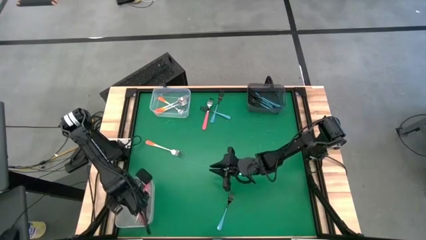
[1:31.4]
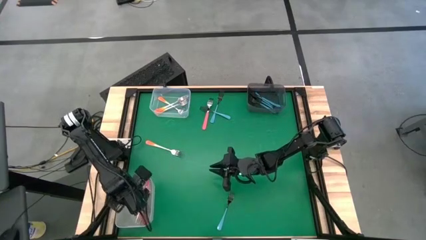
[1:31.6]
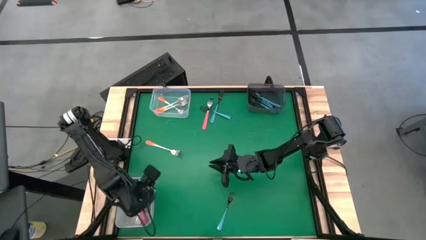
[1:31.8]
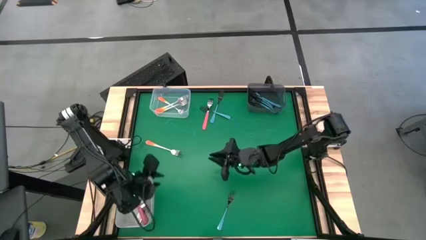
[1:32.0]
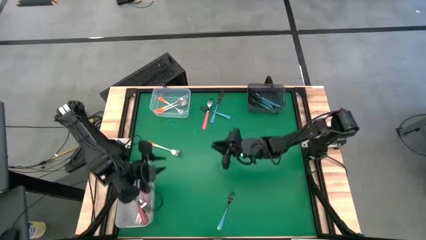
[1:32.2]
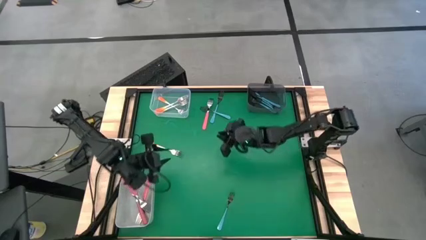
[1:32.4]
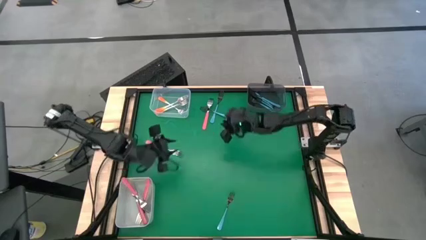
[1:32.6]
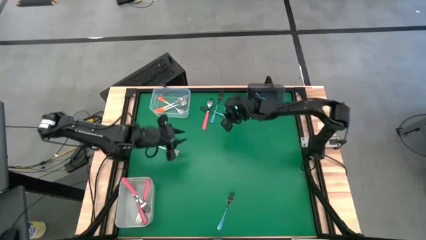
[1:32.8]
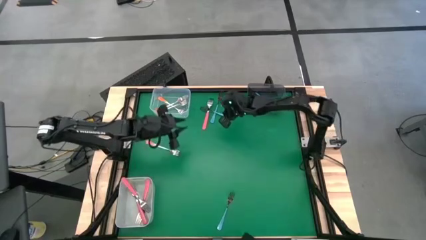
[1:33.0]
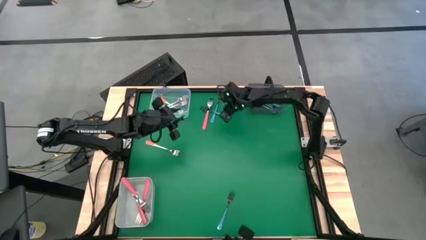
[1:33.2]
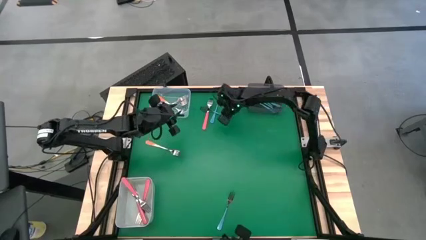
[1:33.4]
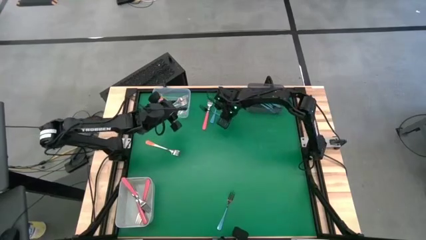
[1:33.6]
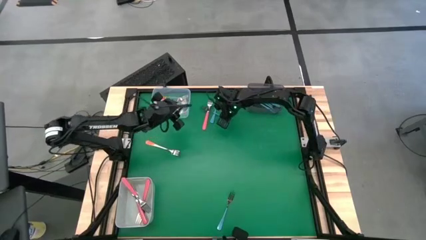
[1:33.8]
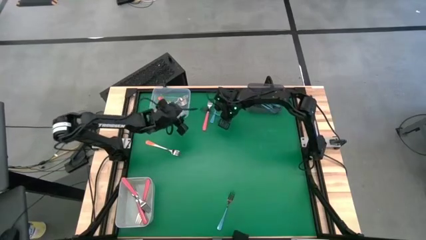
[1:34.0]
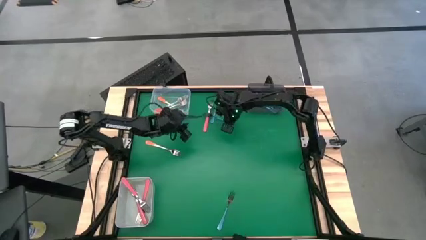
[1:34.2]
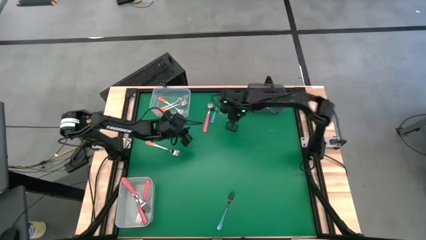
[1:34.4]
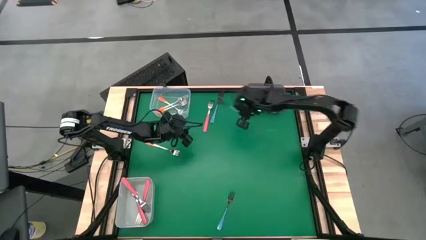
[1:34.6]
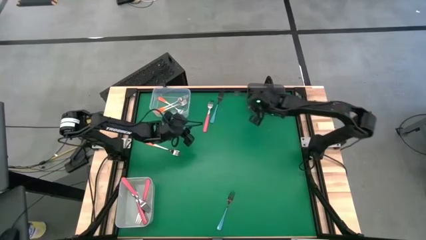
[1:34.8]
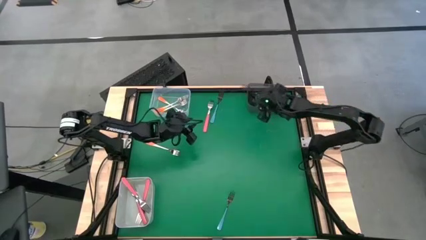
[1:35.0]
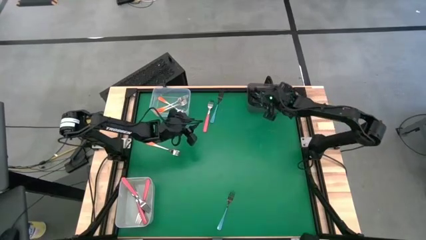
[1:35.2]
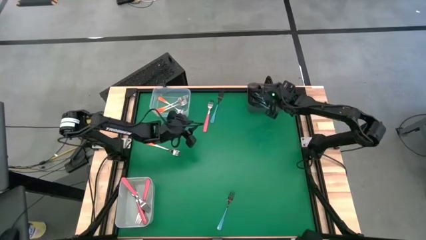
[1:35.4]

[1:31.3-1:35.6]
Task: Sort silverware by color (type)
Put the blue fork into the black bin

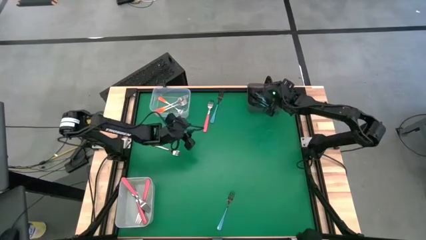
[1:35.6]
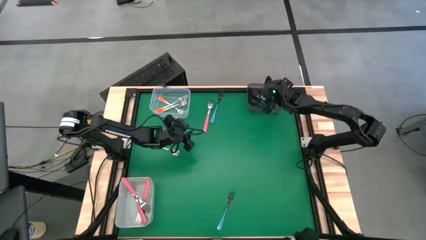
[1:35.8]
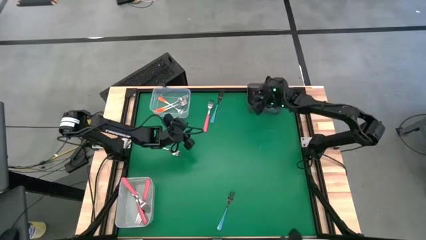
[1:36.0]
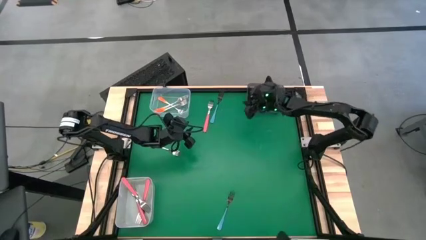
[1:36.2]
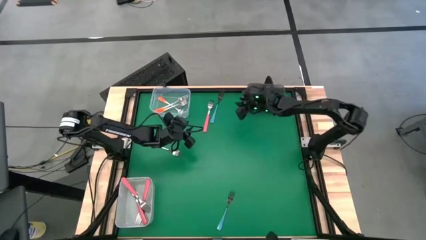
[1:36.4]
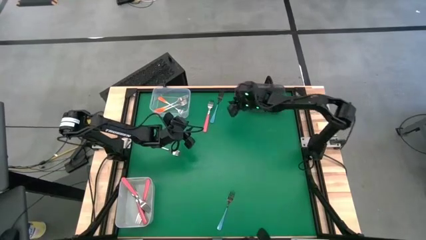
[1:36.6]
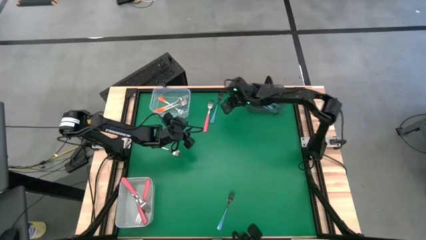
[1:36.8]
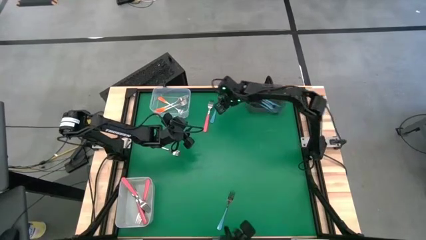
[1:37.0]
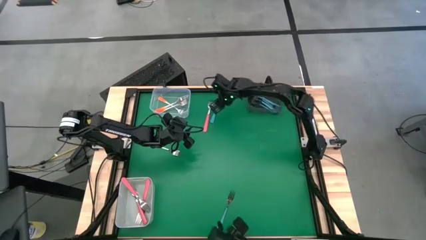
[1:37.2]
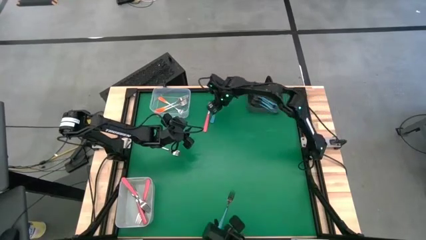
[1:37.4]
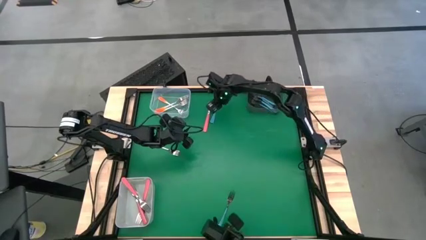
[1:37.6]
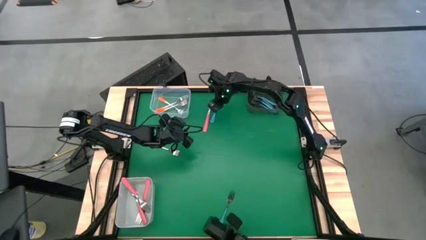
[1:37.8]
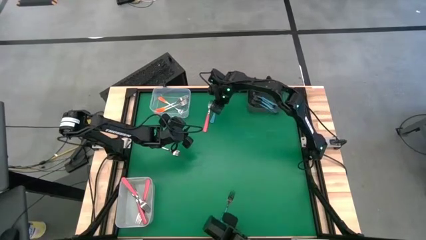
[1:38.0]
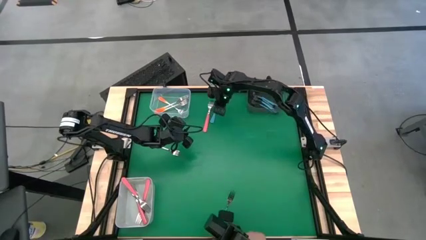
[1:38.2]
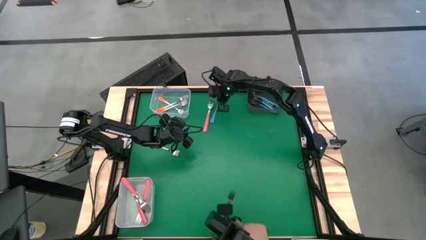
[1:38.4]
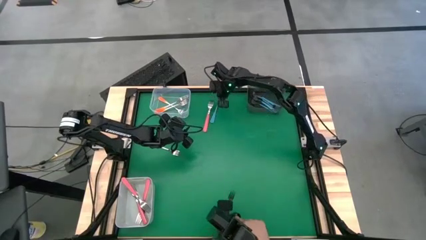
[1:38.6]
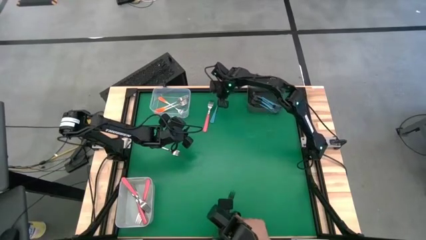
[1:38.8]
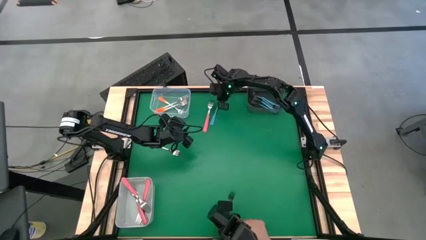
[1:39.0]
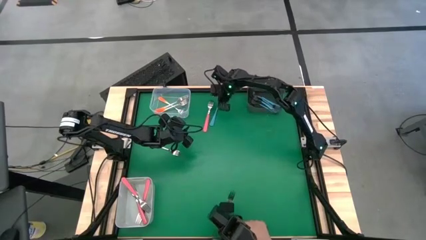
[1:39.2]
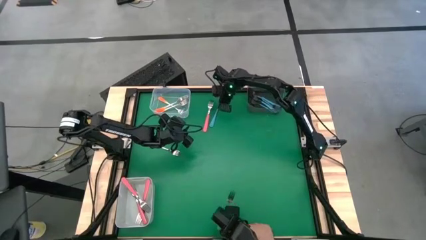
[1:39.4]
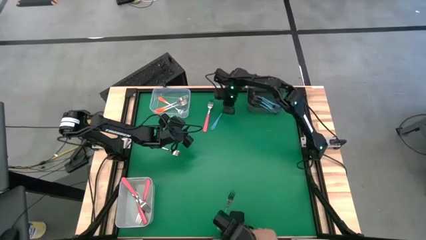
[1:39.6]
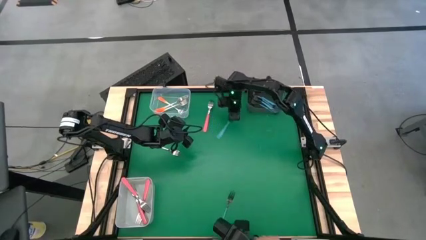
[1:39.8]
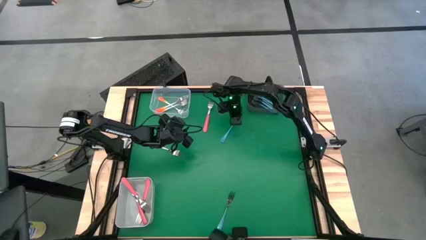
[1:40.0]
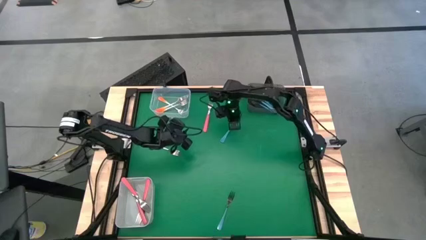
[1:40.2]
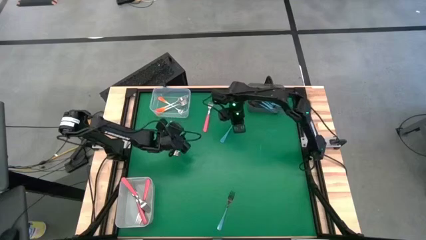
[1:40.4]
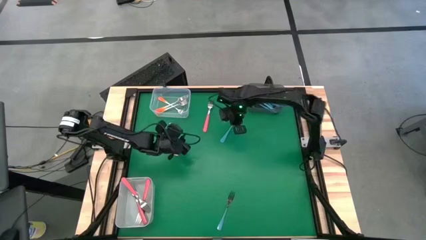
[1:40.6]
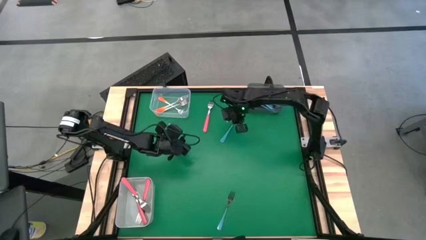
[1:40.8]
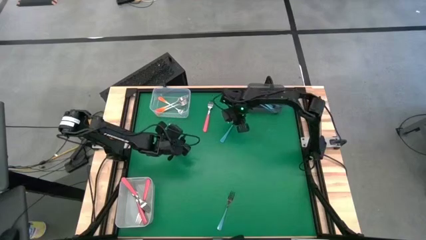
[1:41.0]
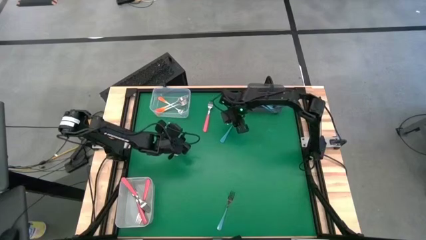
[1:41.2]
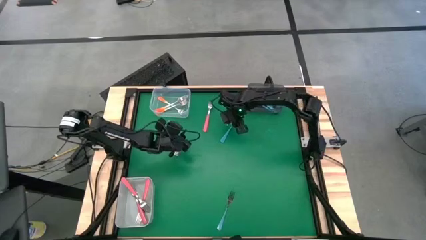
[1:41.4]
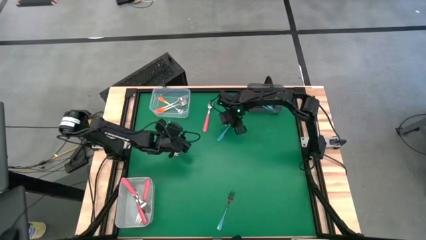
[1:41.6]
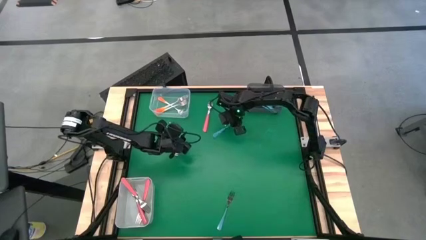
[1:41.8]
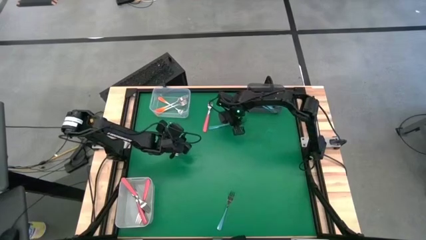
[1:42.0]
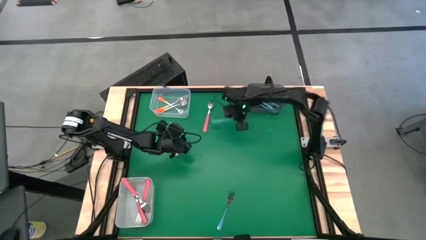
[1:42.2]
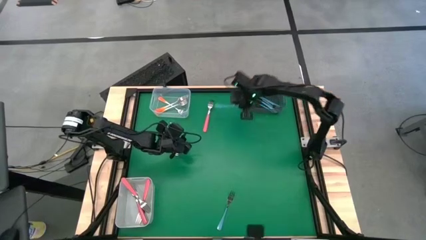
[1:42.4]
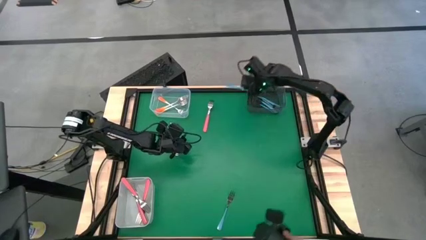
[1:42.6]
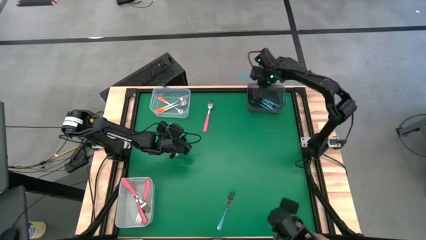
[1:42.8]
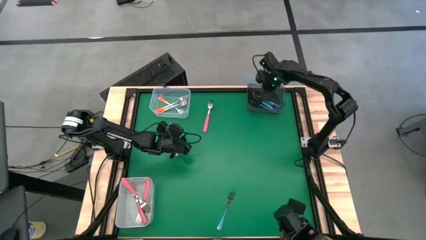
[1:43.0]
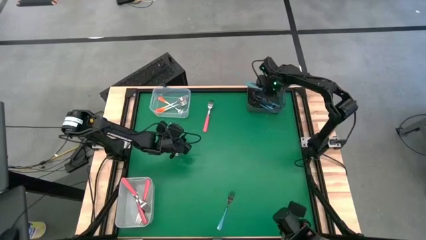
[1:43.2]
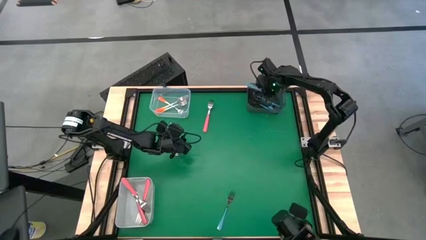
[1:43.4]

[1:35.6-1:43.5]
Put the blue fork into the black bin

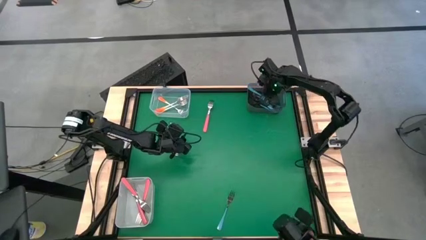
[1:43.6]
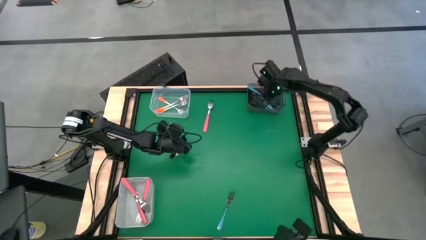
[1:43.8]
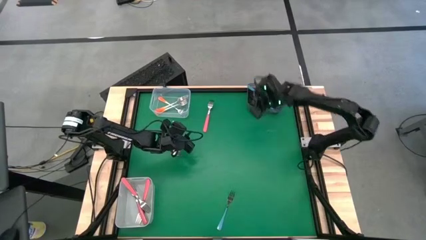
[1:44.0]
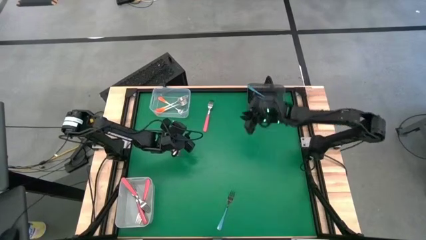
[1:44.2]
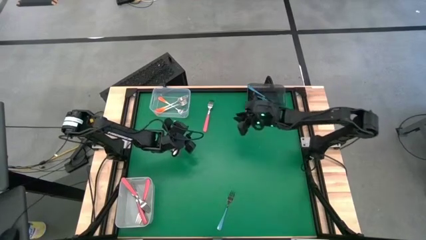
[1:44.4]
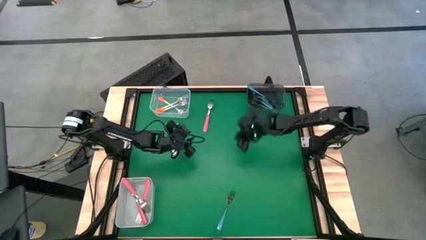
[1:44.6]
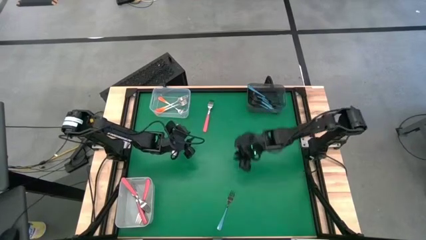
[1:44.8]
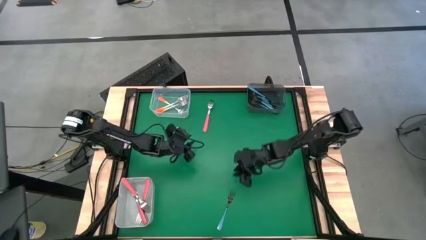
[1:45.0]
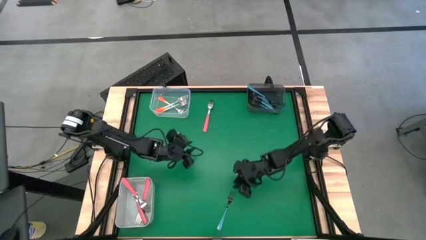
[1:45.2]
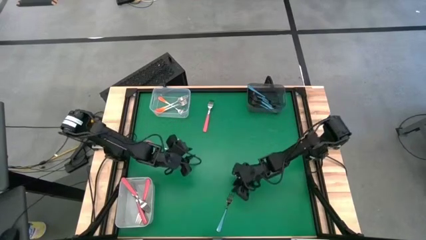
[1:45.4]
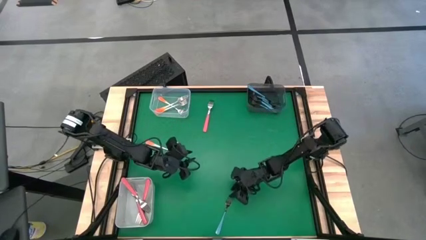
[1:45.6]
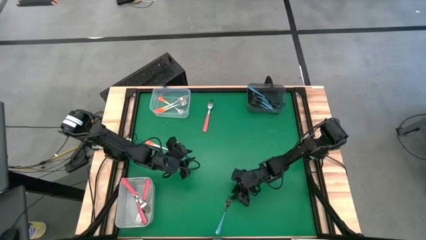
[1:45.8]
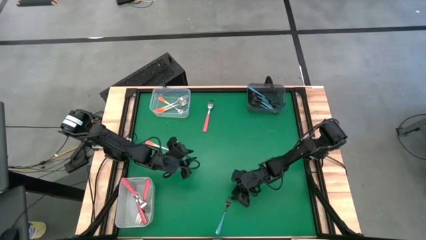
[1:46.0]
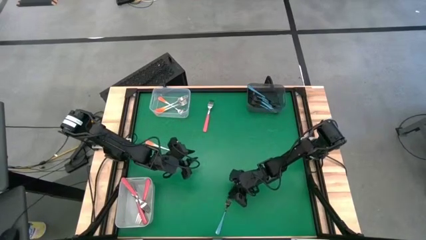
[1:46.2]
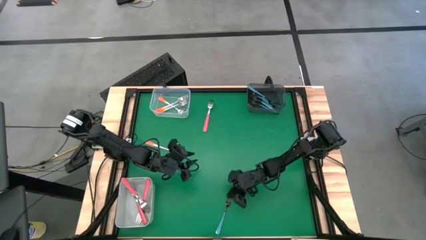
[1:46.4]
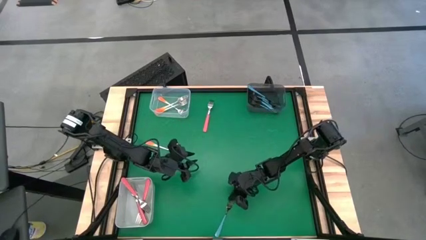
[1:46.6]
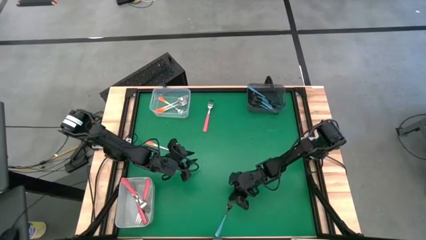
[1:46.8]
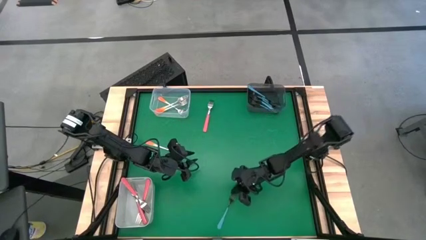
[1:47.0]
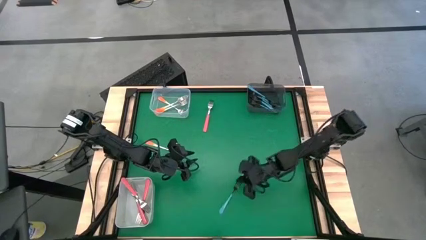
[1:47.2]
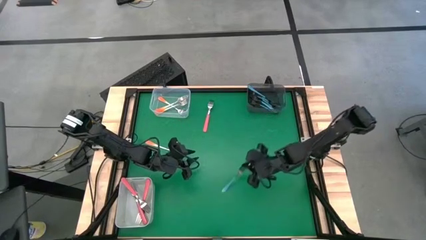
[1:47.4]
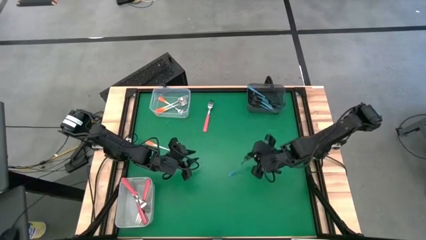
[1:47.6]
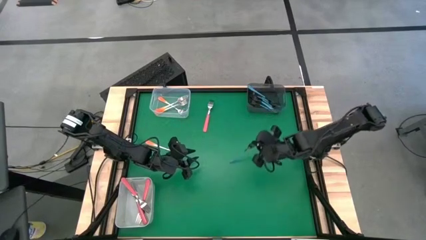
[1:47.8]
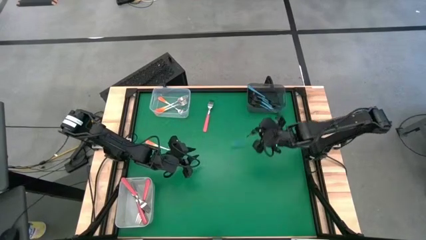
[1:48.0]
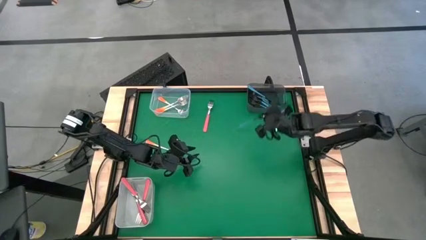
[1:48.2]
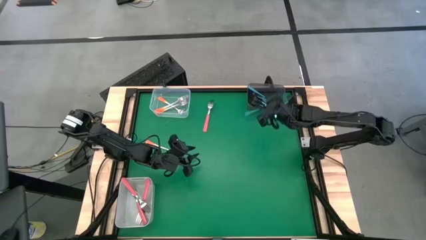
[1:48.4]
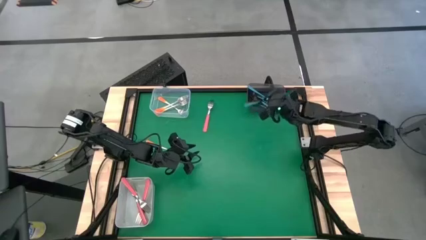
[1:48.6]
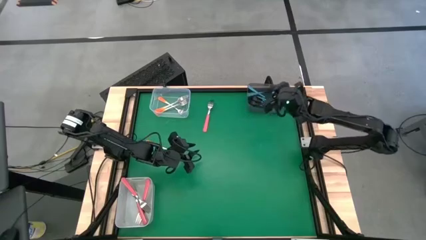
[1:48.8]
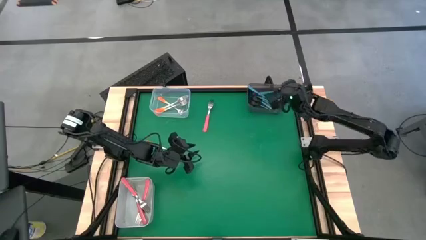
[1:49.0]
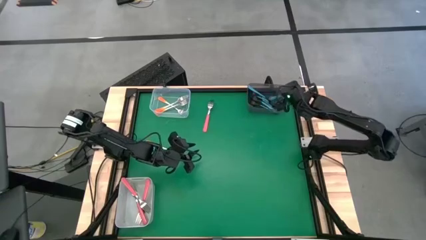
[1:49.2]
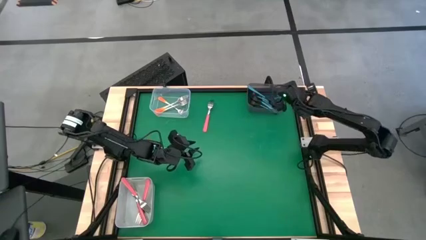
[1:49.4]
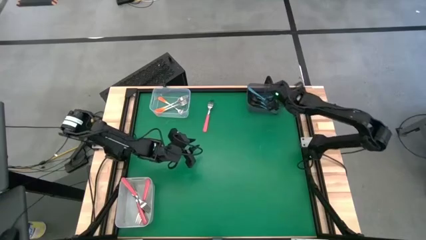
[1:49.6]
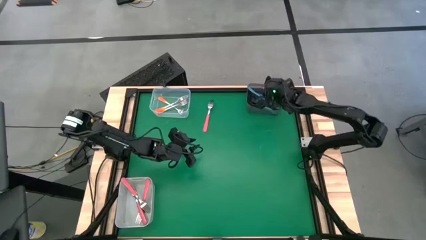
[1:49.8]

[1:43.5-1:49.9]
Put the blue fork into the black bin
